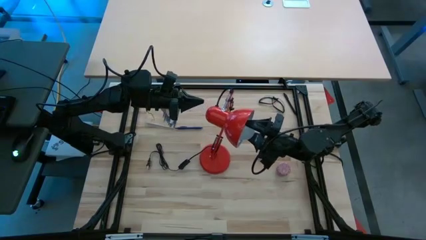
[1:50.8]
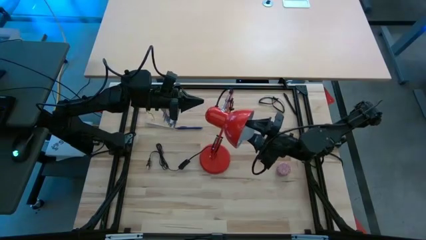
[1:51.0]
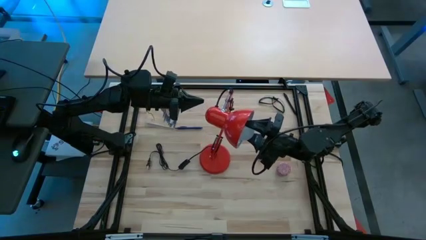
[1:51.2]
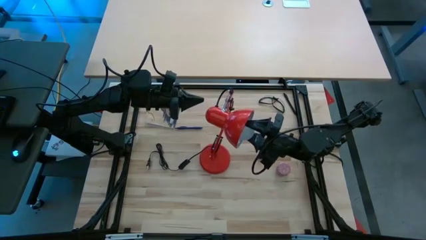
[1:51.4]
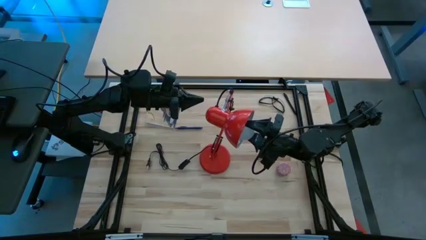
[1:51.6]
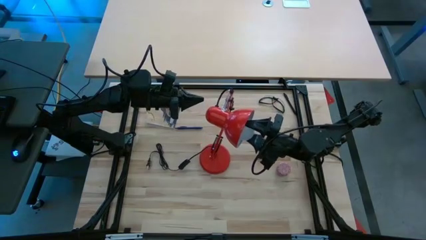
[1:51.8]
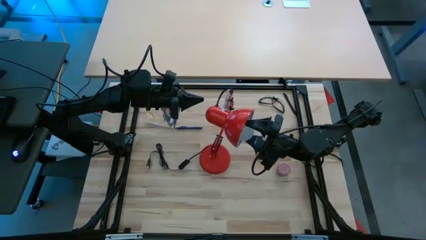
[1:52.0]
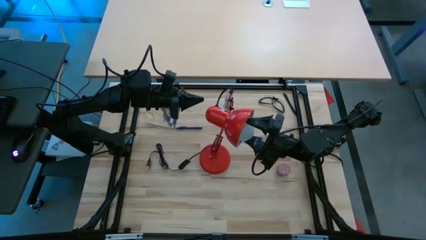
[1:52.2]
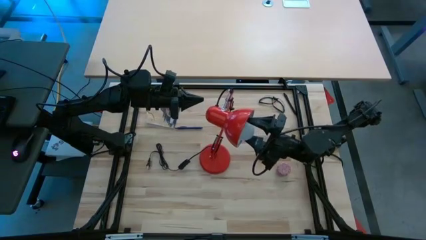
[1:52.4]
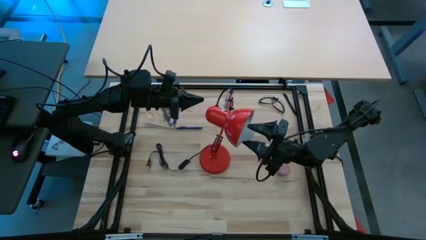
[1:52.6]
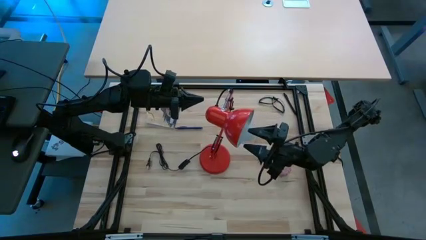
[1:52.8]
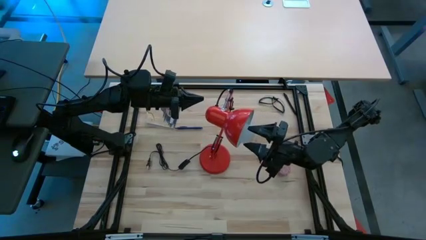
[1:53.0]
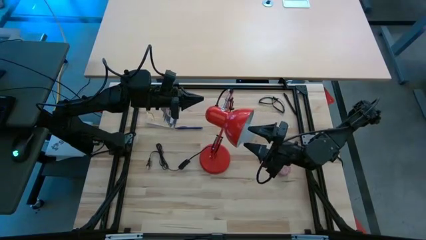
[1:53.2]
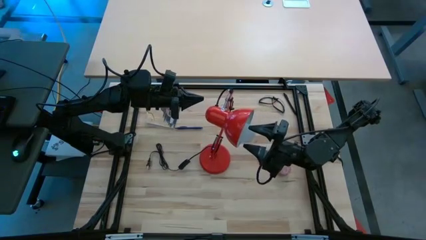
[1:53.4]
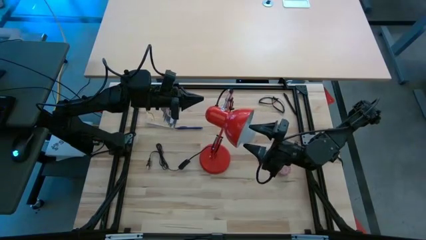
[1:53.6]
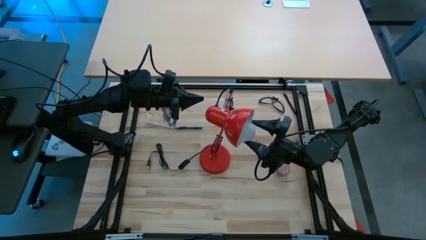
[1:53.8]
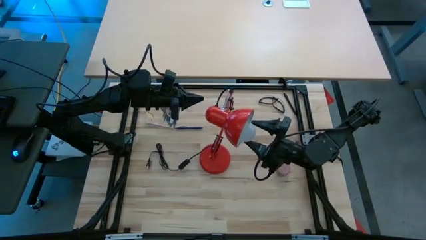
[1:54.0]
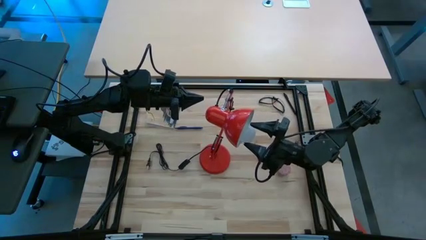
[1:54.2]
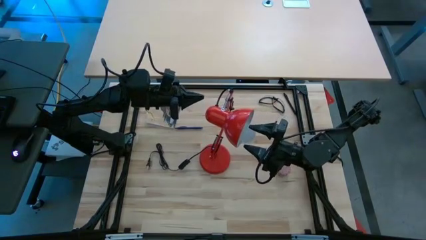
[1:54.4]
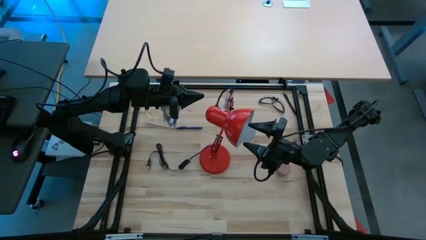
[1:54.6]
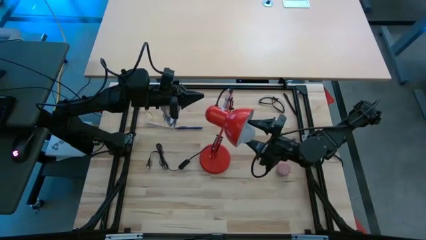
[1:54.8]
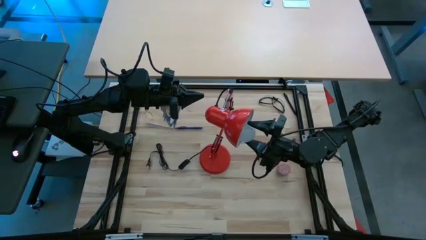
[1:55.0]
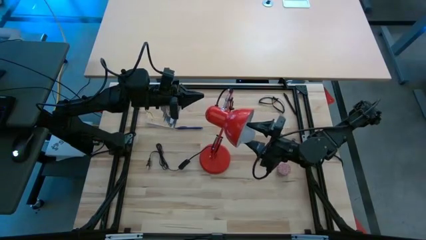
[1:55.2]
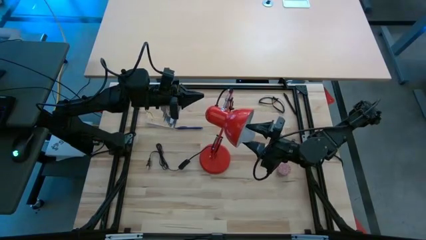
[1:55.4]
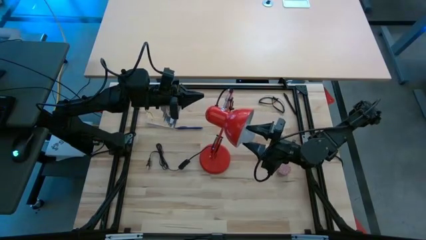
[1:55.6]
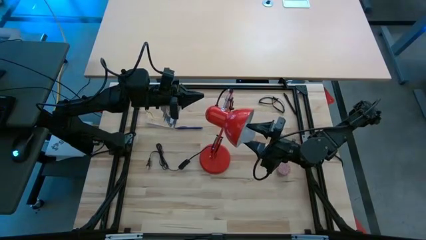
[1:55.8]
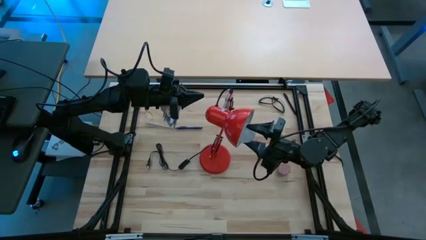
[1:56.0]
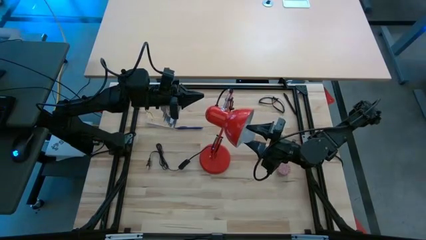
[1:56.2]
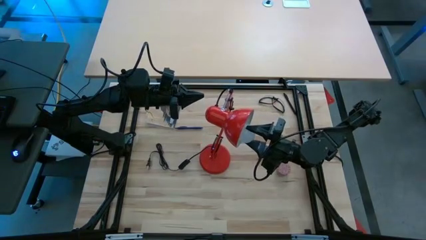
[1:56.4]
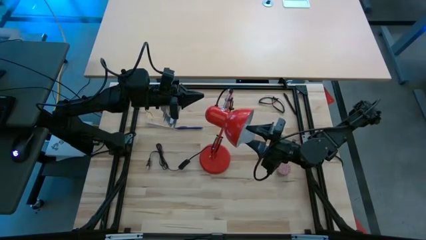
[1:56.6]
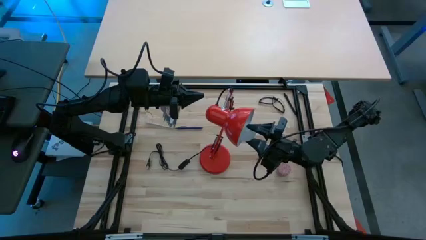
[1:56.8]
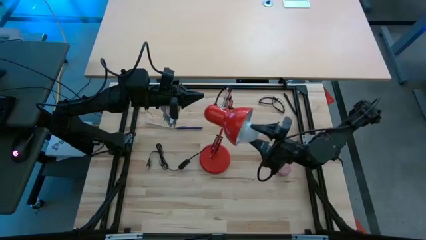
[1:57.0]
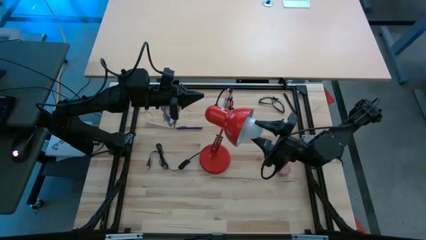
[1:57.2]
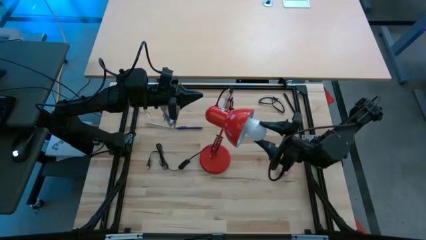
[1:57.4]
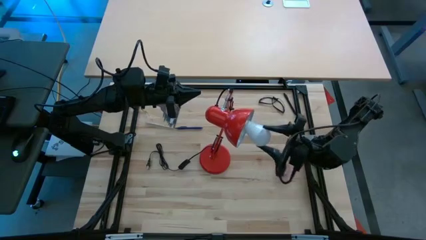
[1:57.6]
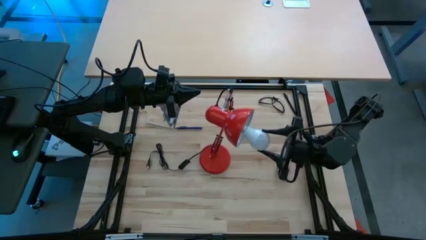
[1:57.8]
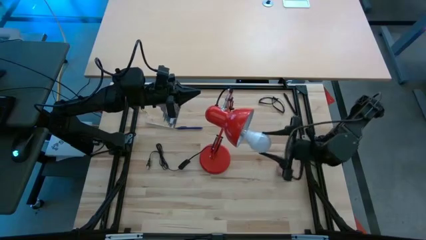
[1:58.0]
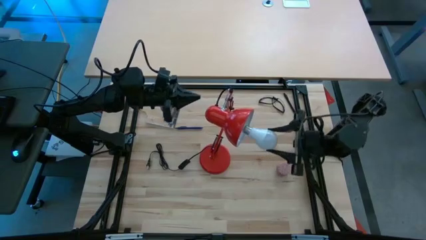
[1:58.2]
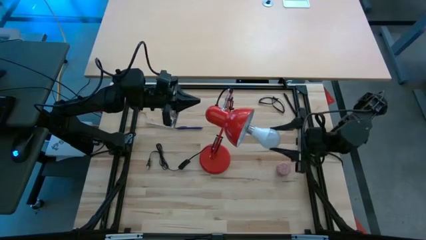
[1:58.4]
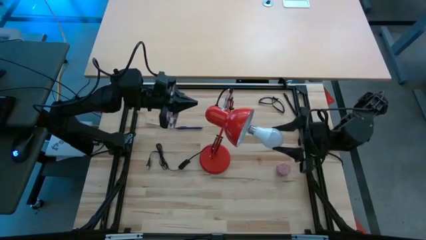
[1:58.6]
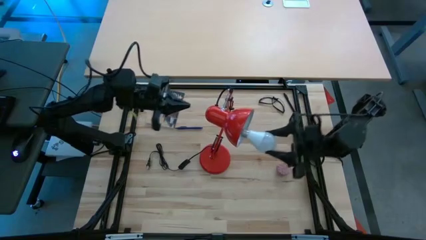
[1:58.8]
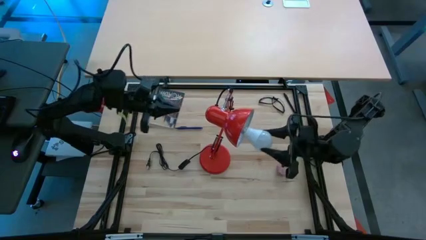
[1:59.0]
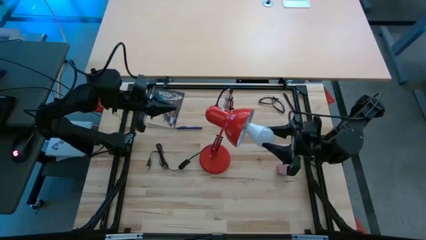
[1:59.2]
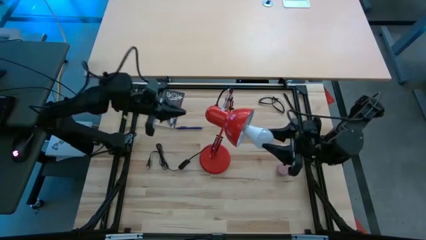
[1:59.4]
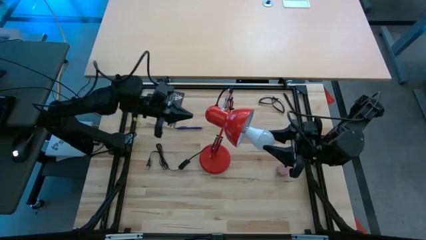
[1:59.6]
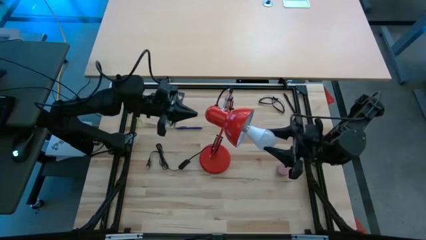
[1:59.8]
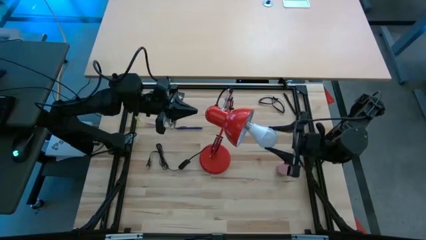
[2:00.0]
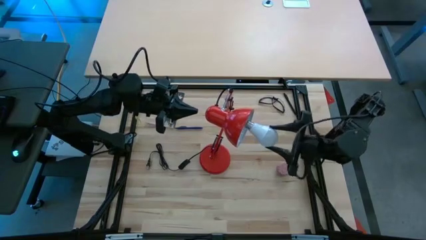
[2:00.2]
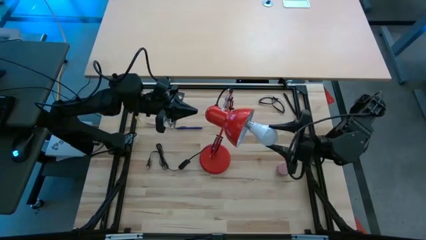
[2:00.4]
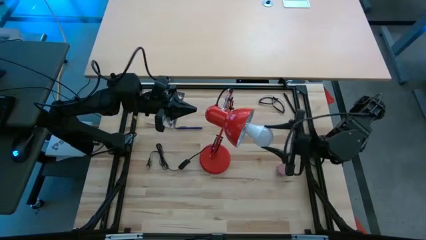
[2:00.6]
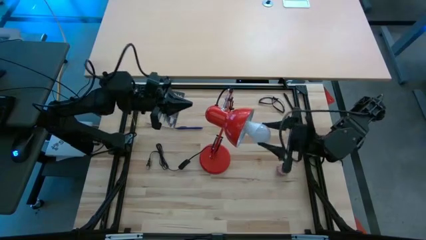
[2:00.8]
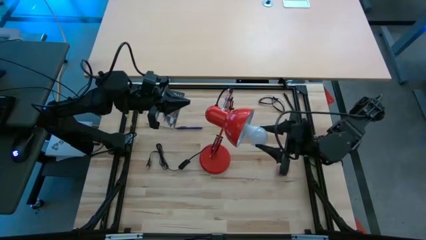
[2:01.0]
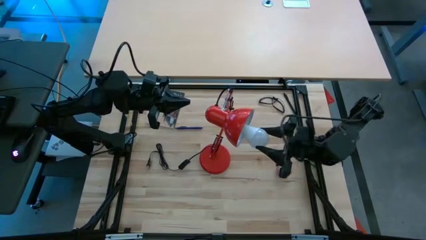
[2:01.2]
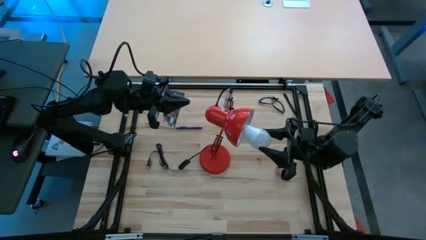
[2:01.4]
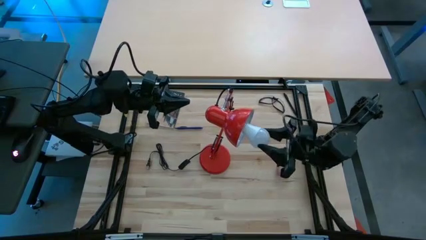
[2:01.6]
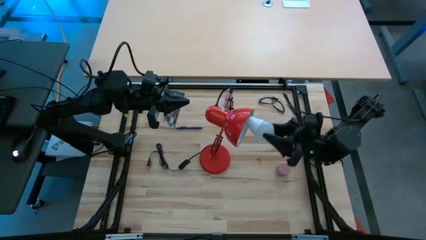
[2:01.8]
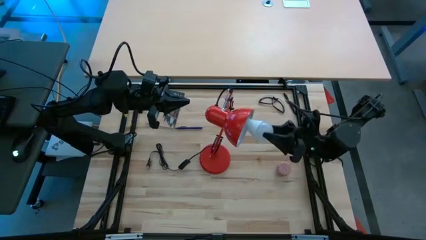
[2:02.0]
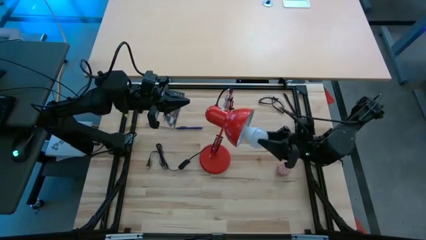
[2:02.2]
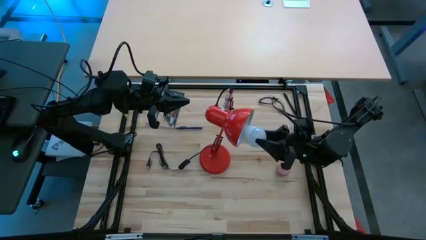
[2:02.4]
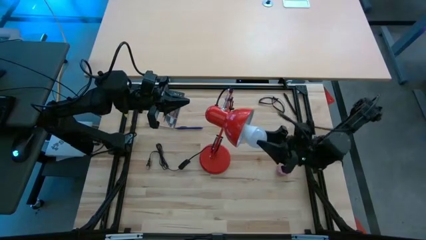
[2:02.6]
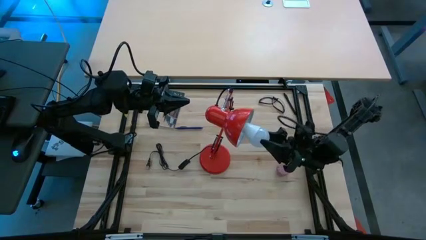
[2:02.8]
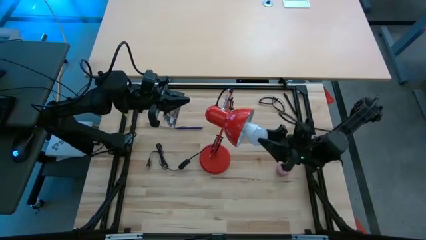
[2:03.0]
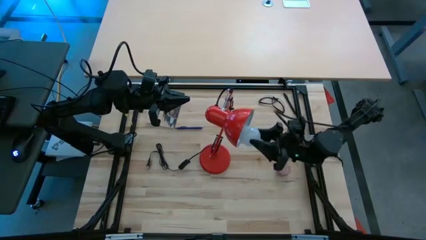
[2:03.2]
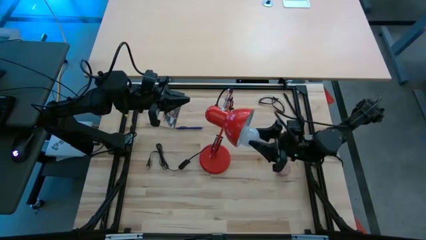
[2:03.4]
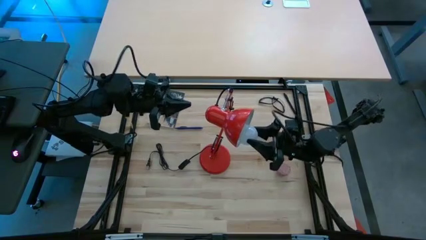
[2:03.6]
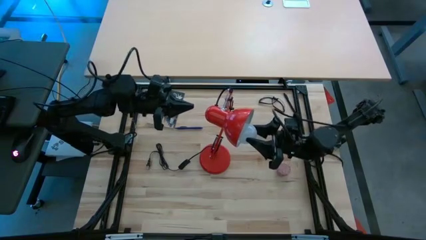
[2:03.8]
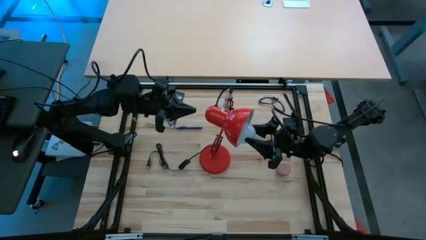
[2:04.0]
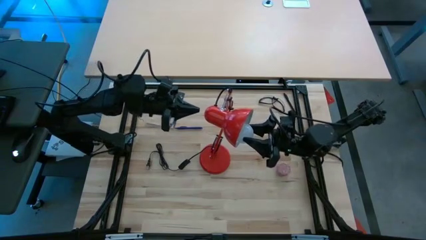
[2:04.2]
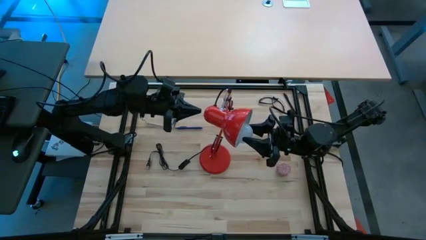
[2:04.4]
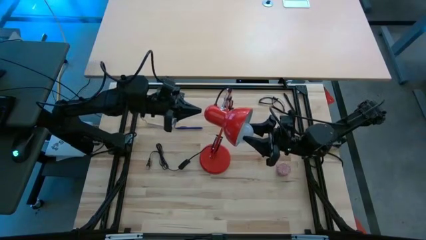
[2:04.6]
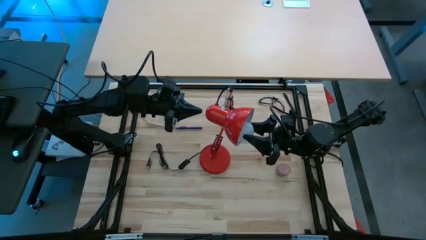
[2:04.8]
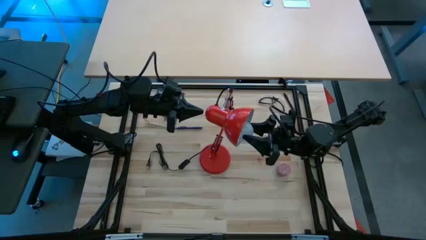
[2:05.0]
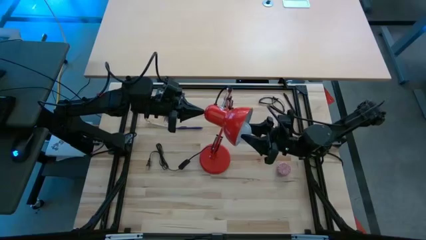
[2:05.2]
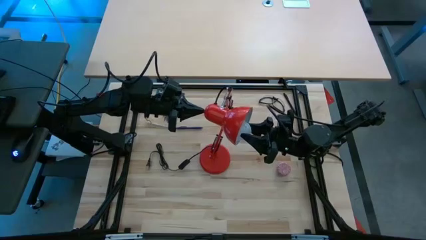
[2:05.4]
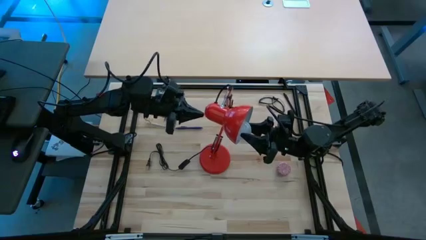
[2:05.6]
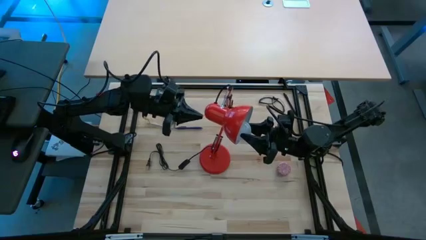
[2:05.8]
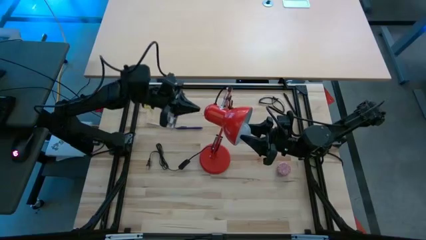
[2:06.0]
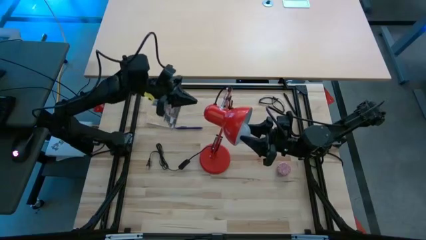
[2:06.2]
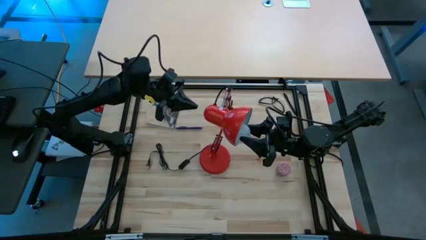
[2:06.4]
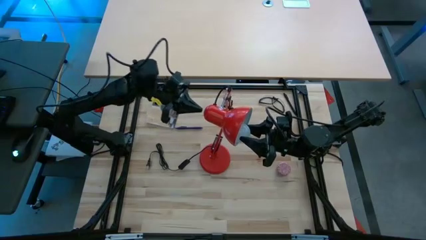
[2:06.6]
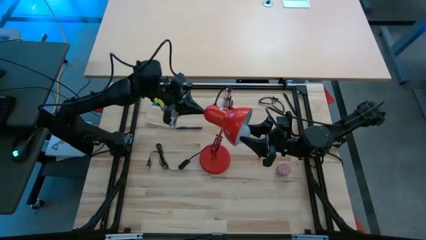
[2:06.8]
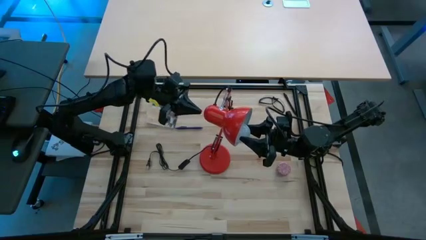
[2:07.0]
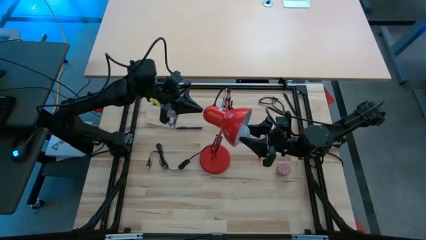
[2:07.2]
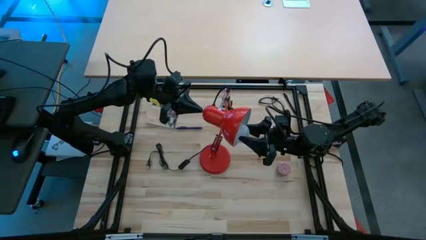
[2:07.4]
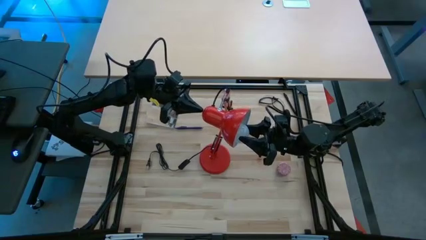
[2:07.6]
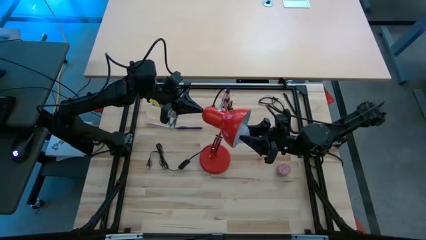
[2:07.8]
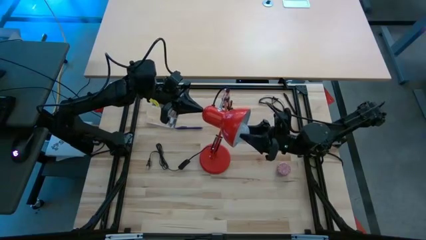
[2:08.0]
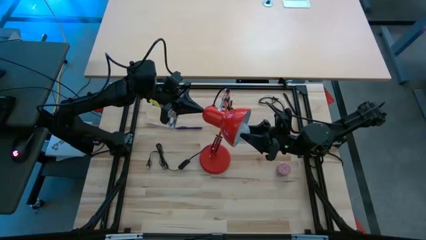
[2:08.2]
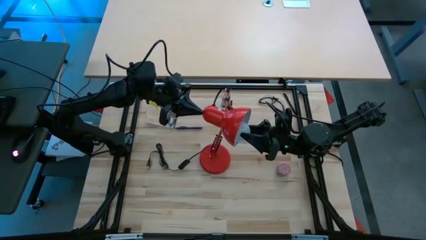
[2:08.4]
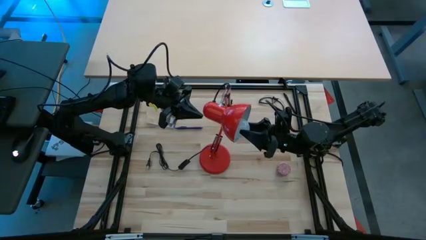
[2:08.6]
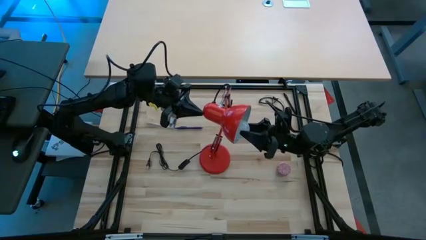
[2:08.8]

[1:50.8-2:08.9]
Task: Screw lightbulb
Insert the lightbulb on the lamp
